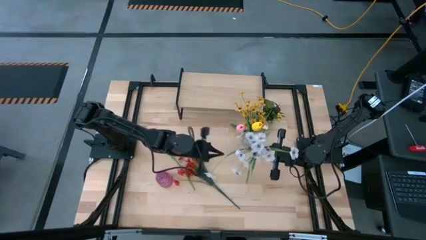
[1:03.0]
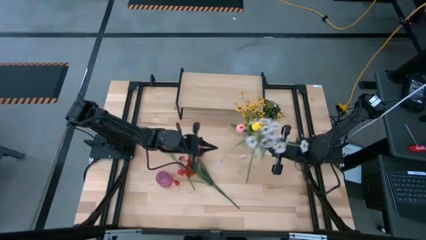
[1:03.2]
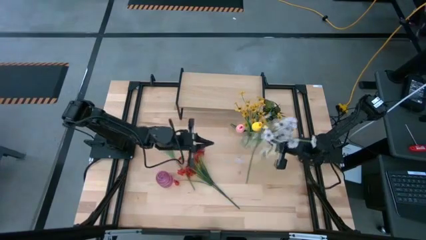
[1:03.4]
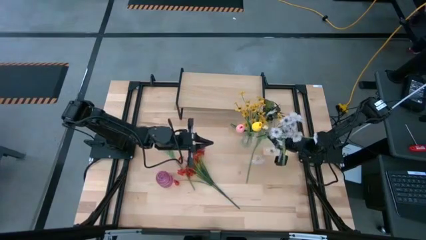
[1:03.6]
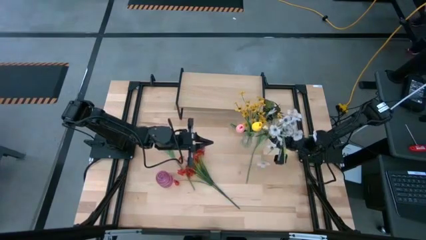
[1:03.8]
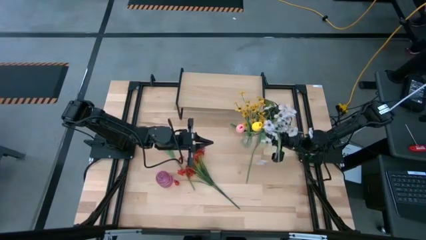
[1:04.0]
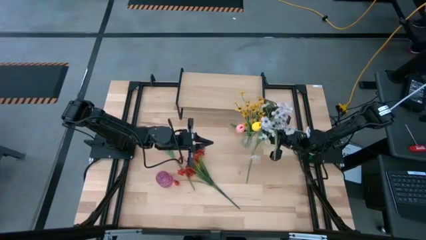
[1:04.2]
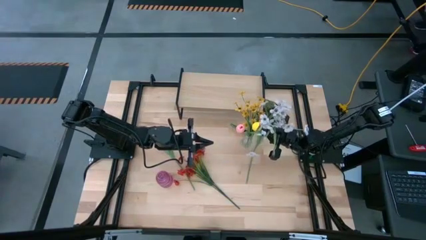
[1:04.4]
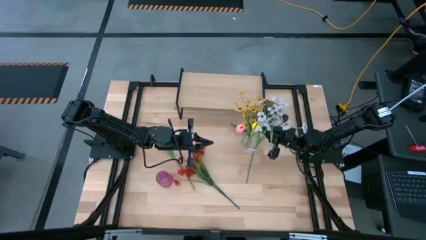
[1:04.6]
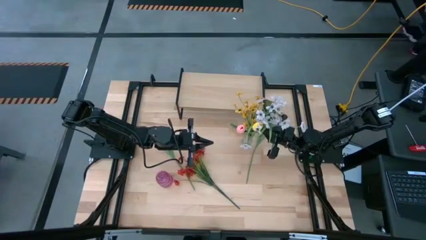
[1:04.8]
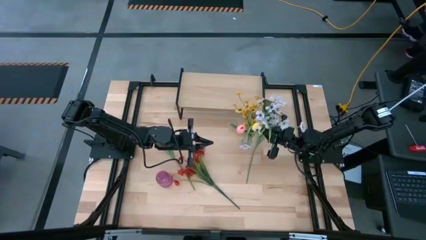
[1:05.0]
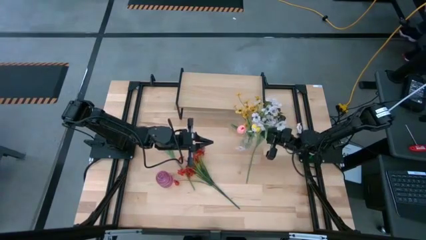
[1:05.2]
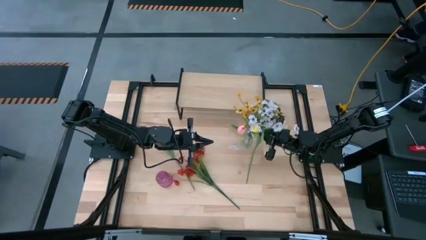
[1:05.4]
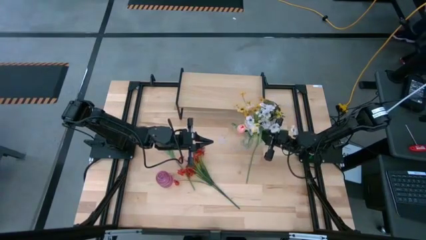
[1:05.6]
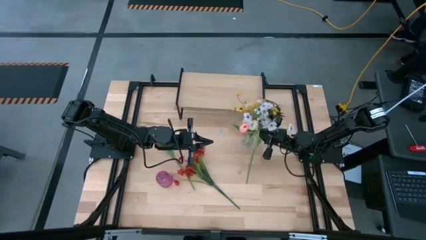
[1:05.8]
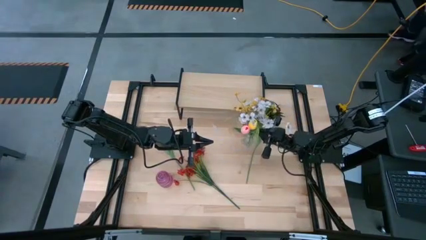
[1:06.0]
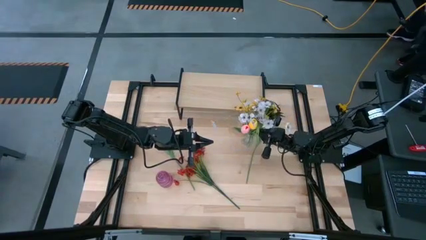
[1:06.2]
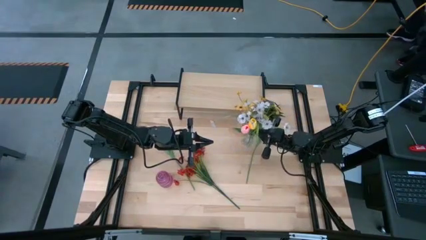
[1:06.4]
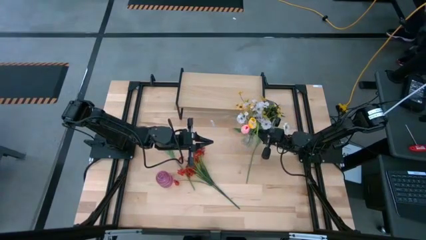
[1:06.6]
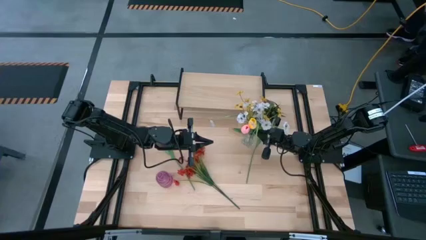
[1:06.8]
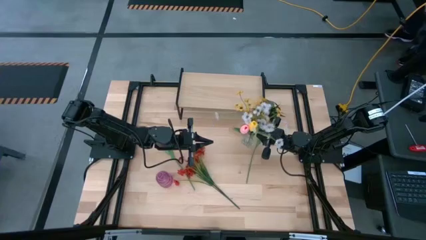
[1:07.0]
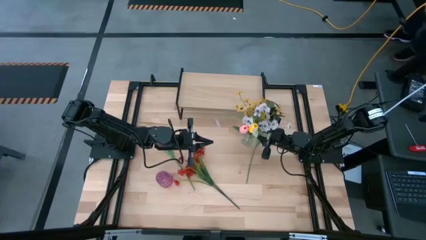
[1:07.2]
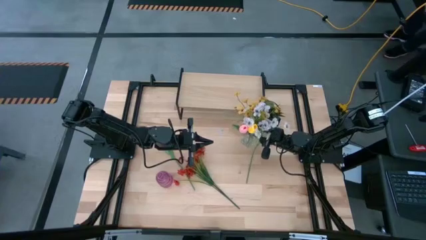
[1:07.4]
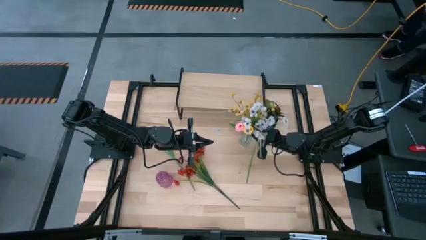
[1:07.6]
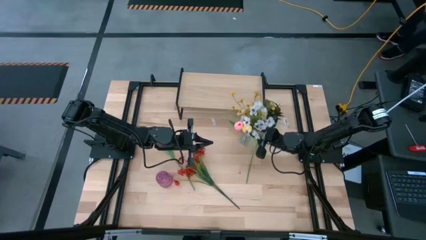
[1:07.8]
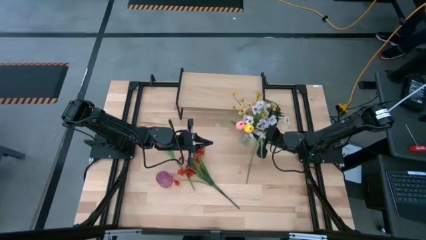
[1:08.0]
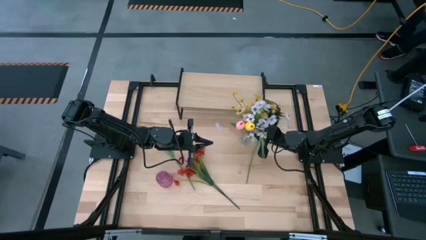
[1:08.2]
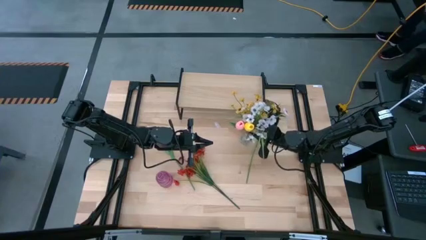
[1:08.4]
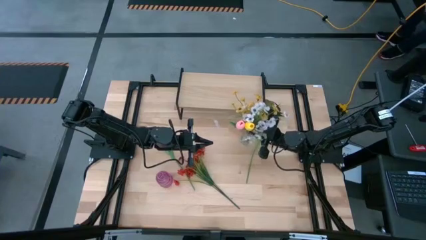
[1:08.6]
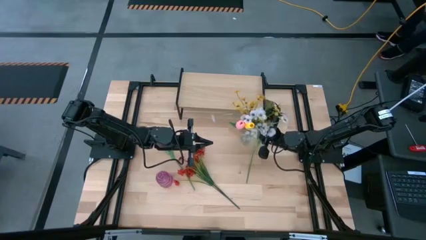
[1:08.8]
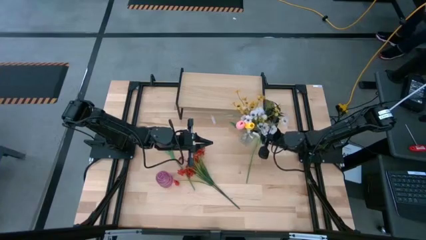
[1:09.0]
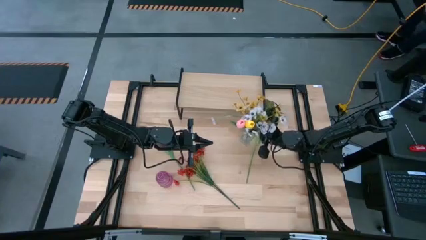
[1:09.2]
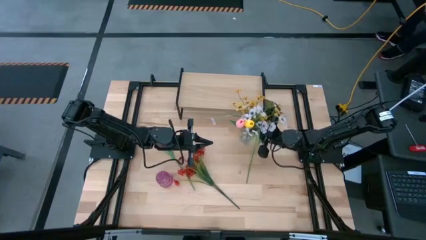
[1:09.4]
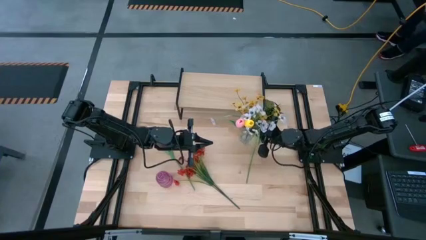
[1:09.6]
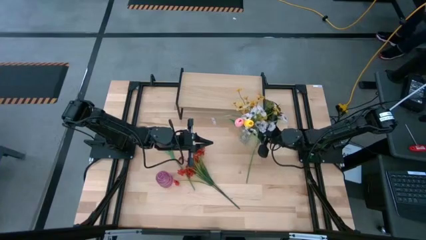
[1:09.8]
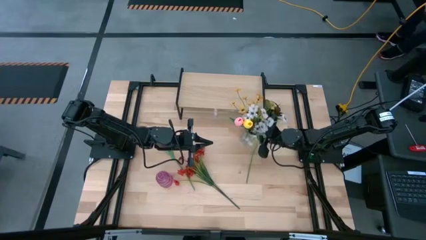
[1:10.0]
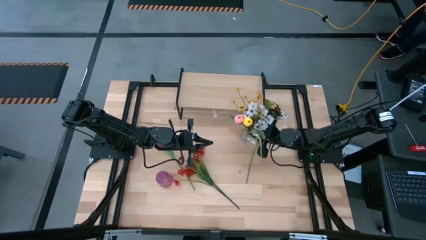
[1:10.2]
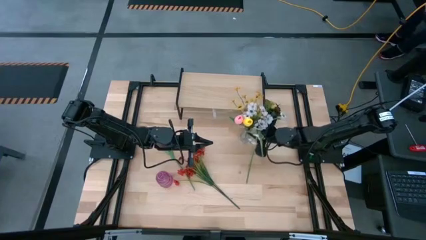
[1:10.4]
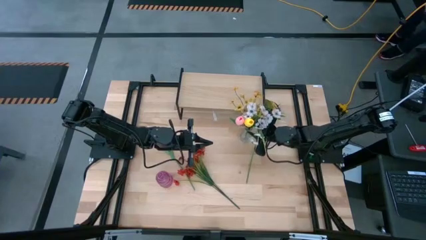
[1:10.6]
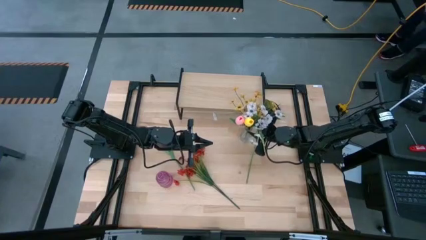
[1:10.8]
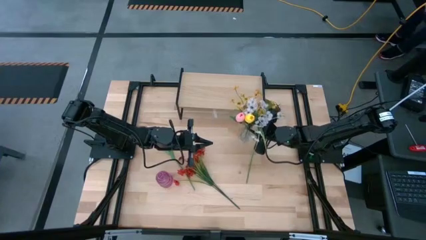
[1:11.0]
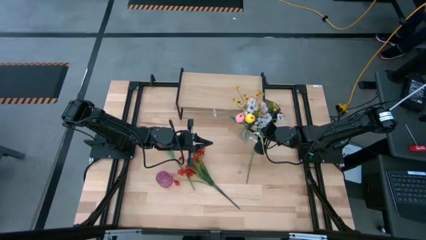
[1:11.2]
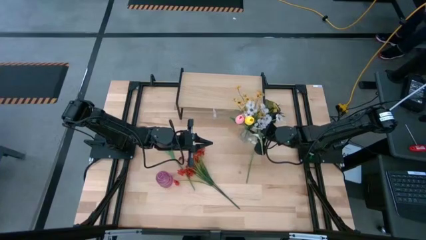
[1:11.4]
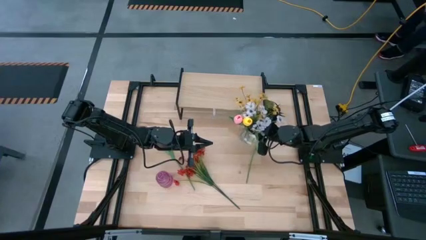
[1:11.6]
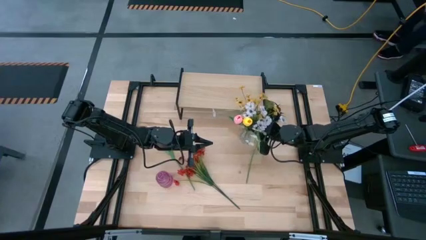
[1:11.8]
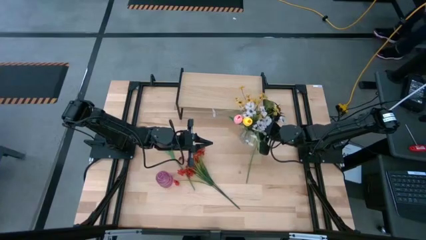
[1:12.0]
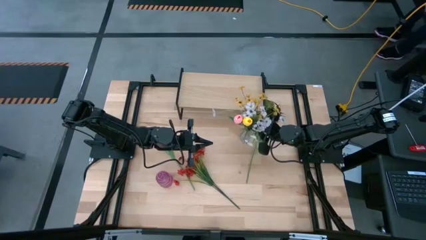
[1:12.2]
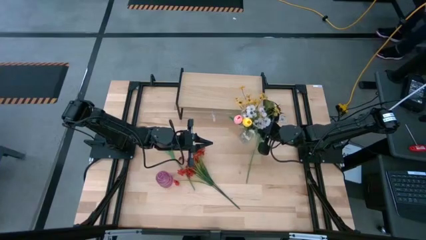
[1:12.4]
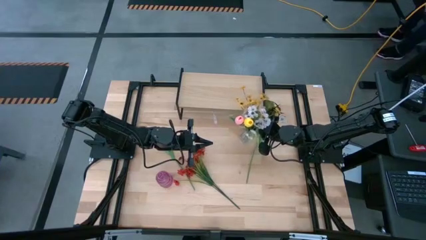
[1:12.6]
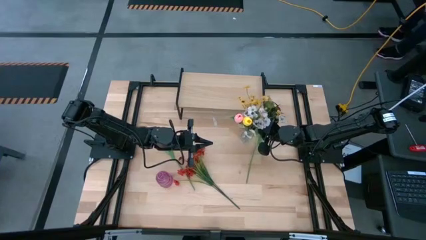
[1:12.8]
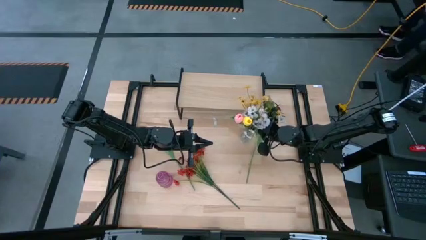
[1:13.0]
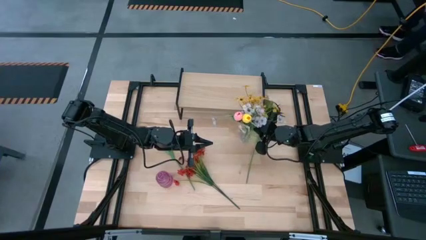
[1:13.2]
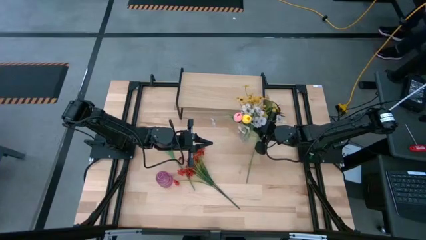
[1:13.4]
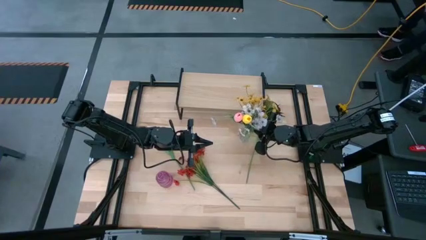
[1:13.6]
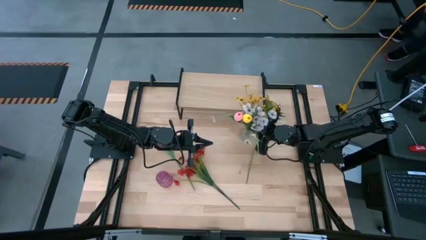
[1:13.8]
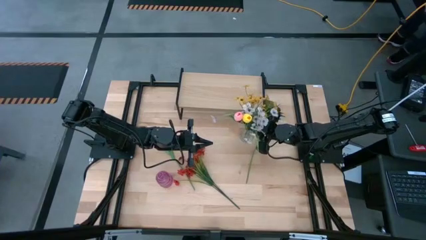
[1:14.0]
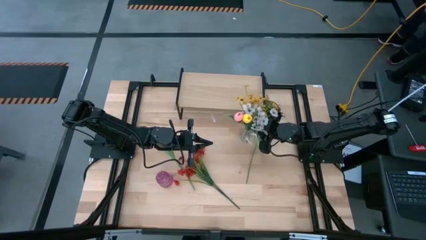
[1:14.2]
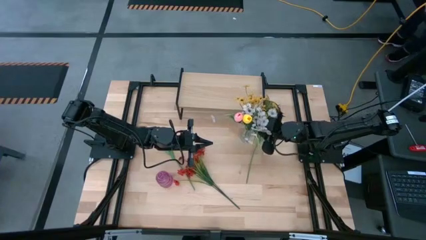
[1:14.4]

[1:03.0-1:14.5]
Task: Pick and place flowers into a vace then onto a shelf
Put the white flowers into the transparent vase

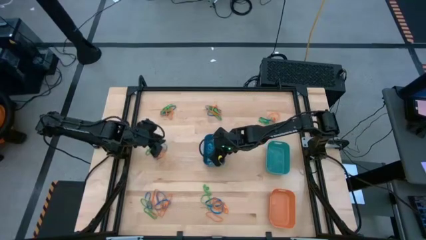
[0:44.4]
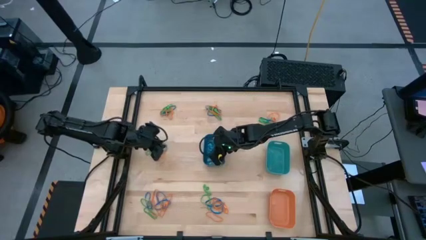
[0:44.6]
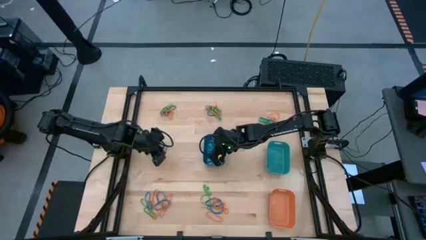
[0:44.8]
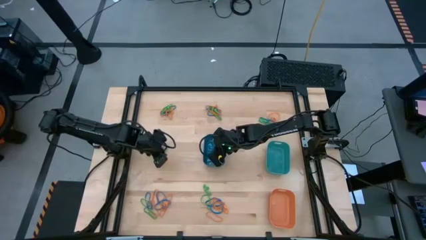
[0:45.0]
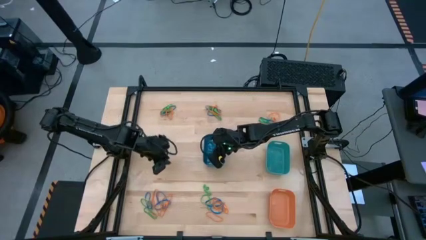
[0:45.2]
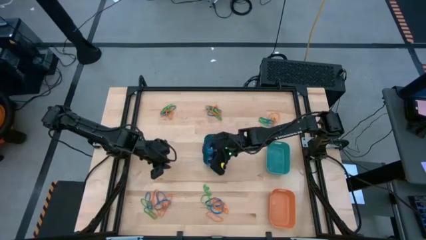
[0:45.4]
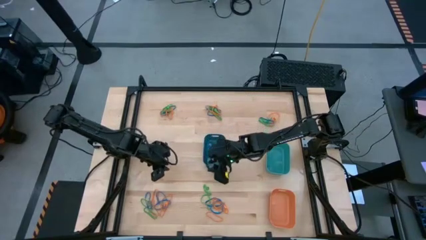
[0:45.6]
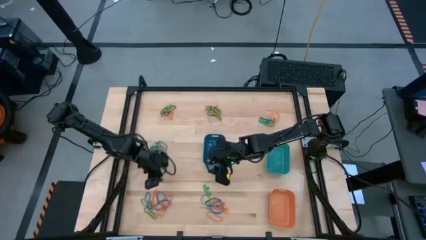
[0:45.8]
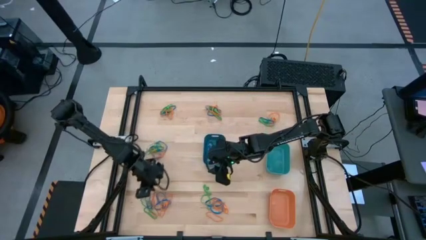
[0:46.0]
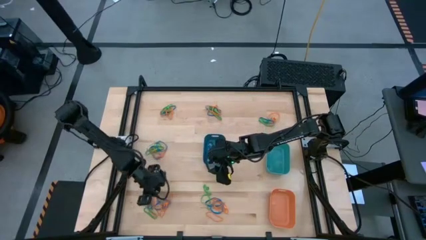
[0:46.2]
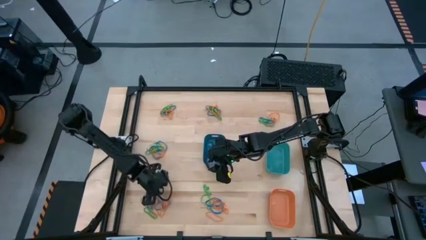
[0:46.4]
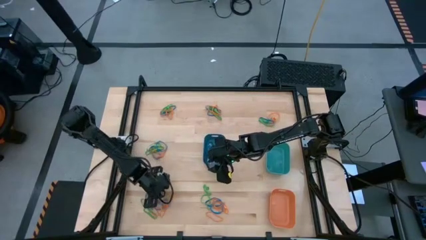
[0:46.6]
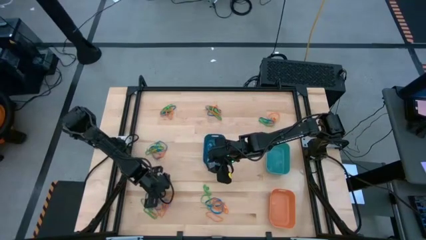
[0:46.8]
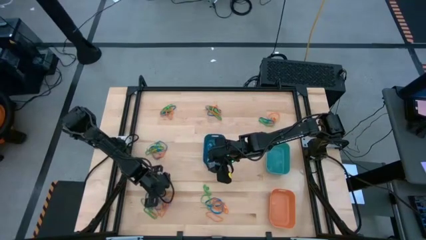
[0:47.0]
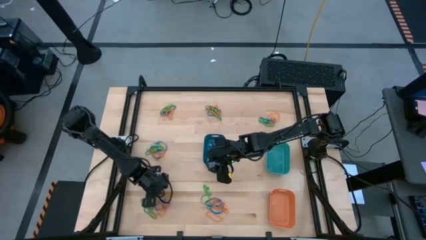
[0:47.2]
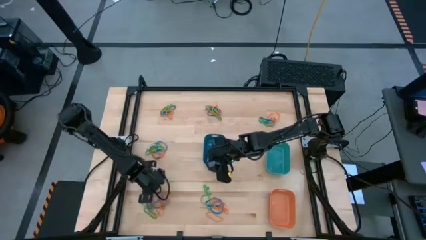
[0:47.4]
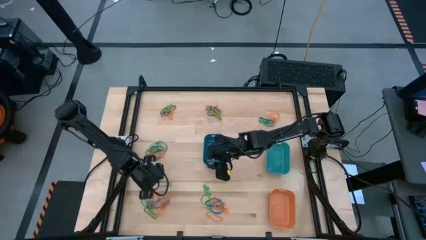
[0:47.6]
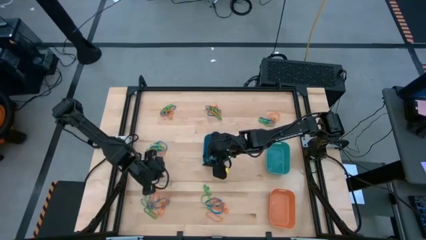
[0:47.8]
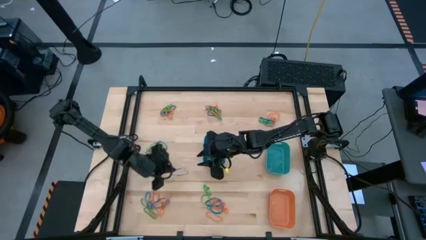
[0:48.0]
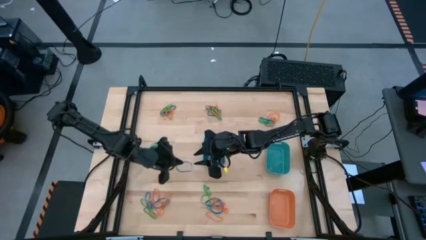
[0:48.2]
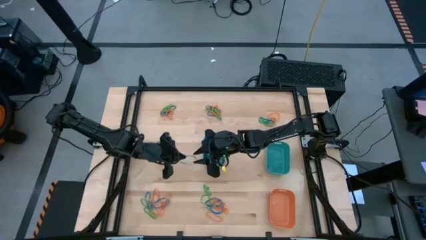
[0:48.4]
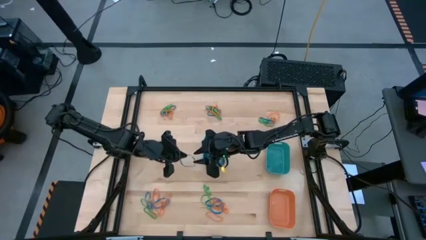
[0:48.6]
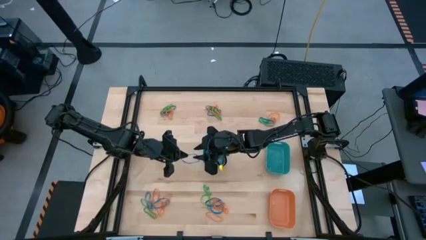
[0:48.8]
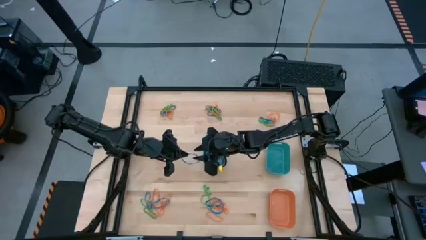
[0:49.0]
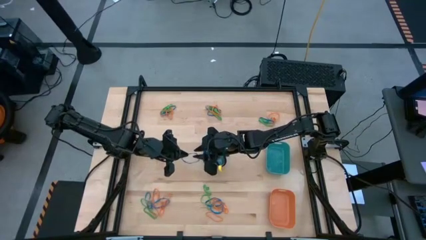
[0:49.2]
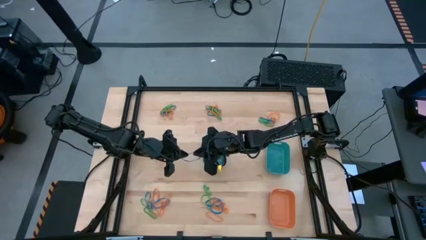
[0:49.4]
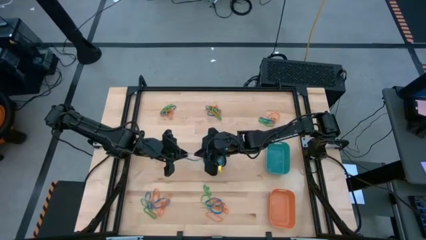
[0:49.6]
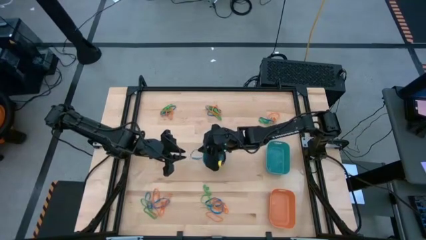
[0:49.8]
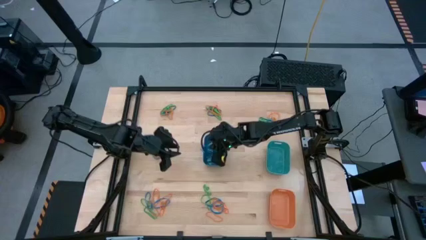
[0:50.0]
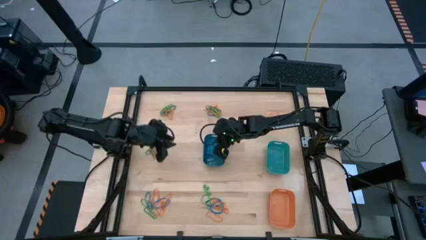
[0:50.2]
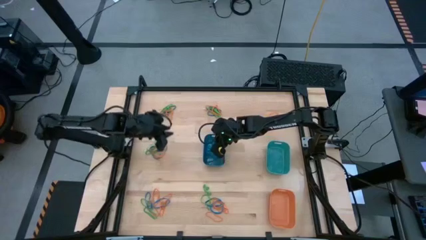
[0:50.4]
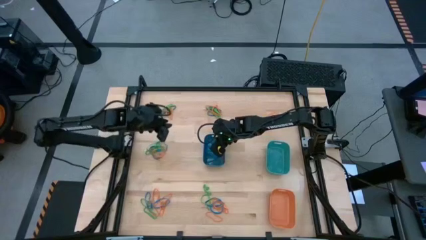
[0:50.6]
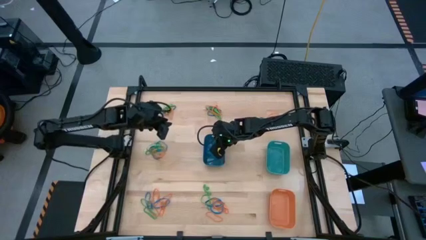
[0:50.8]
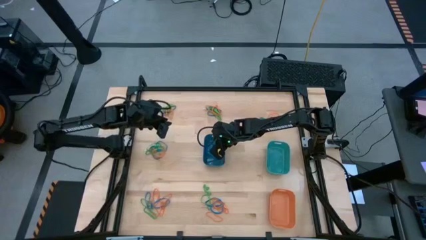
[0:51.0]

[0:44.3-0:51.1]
Task: Sort rubber bands into baskets
Put the blue rubberband into the blue bin
